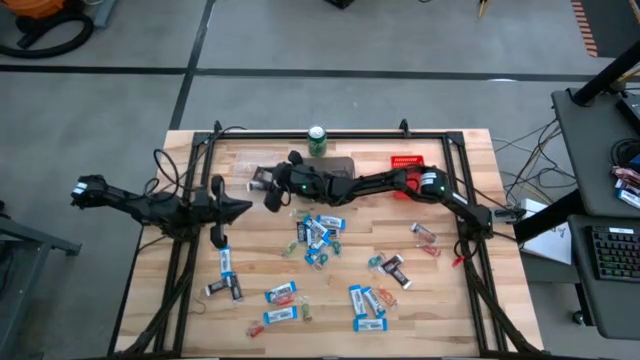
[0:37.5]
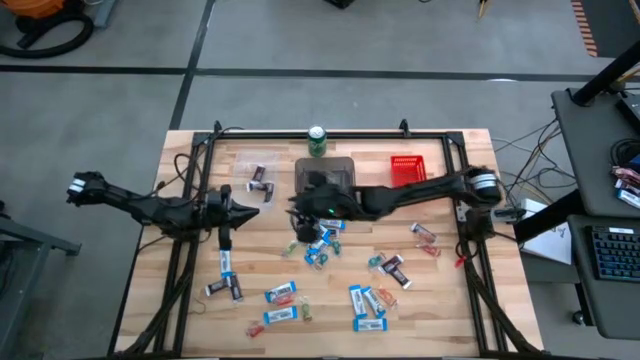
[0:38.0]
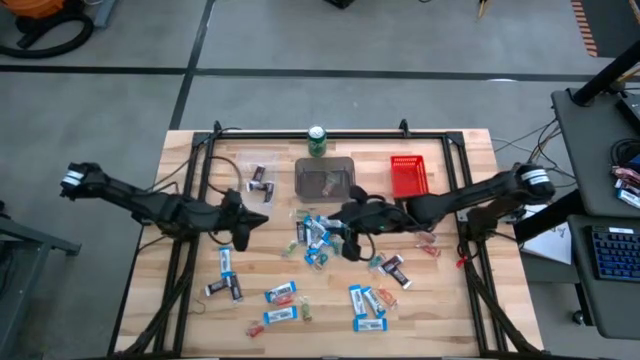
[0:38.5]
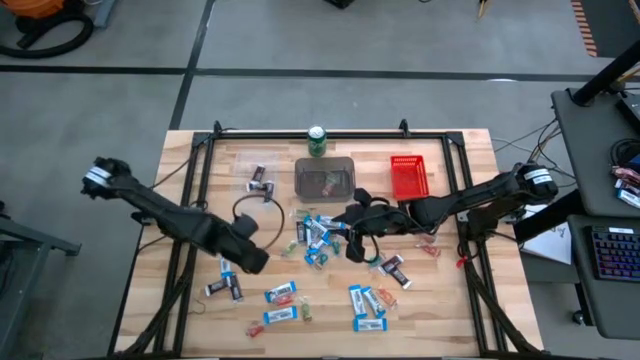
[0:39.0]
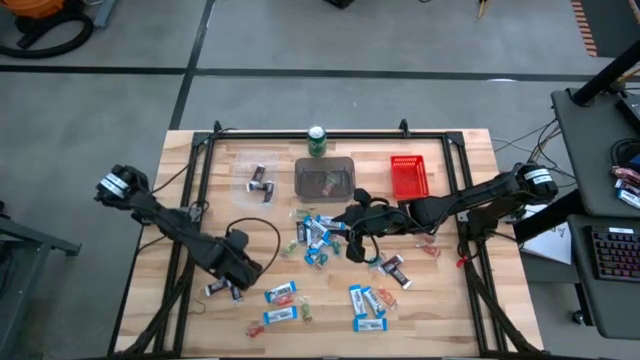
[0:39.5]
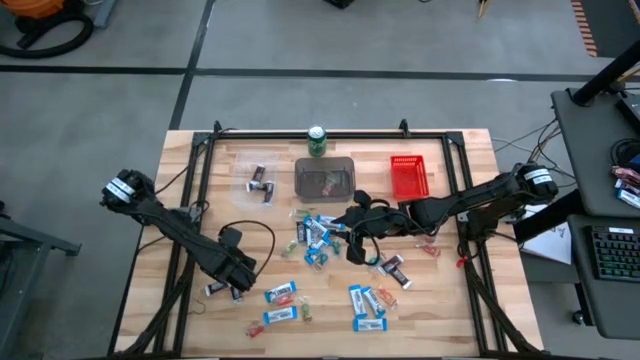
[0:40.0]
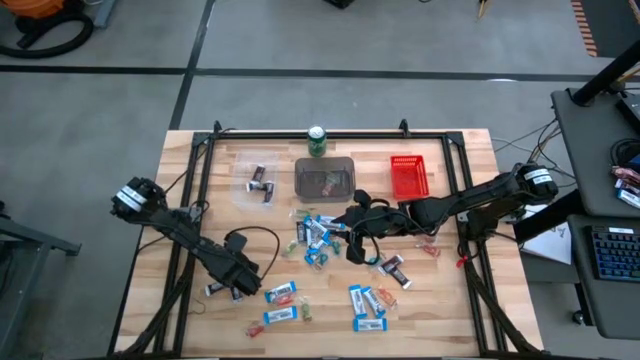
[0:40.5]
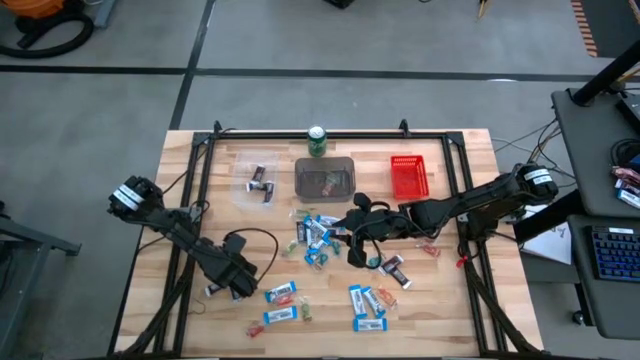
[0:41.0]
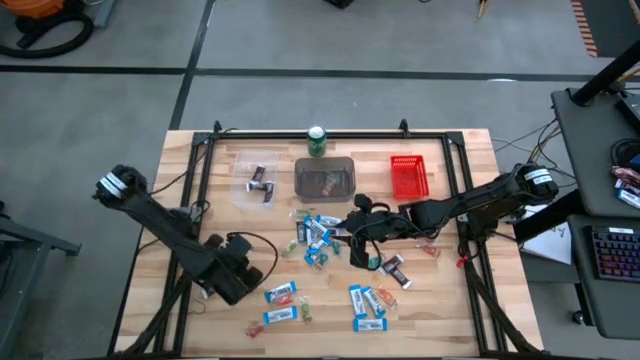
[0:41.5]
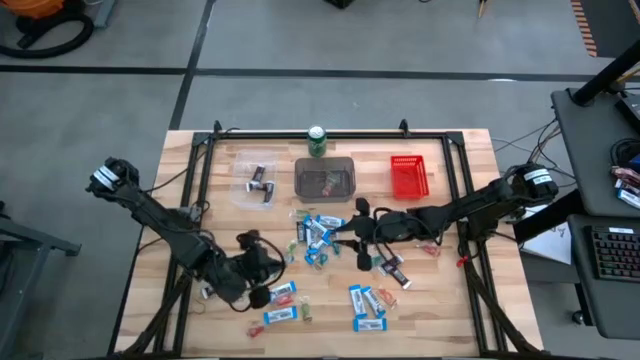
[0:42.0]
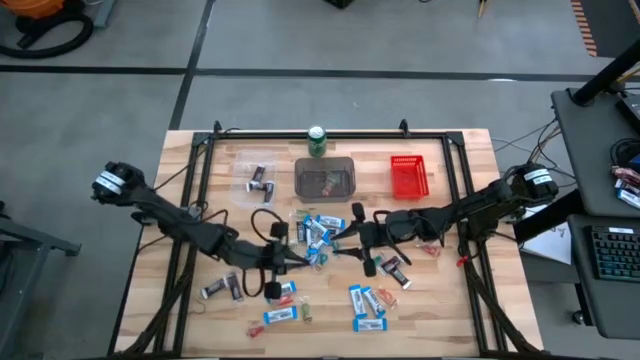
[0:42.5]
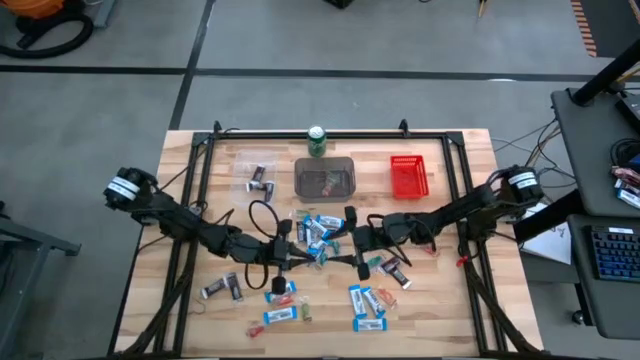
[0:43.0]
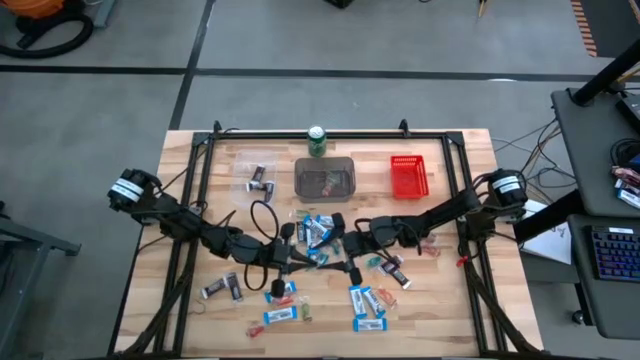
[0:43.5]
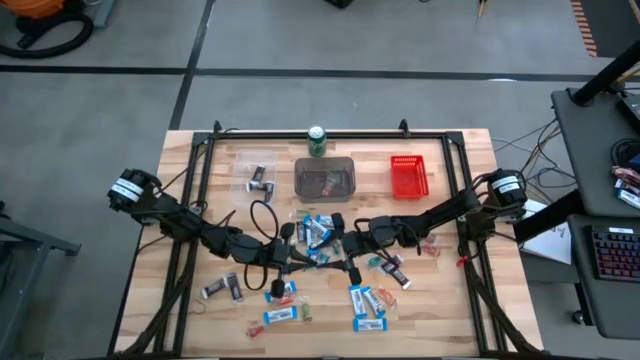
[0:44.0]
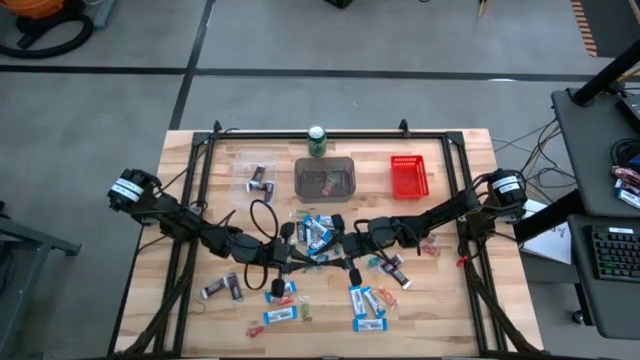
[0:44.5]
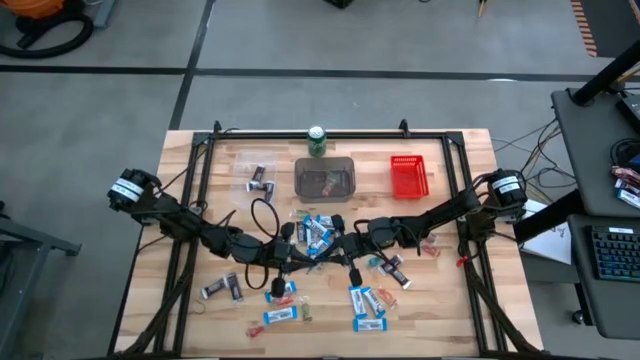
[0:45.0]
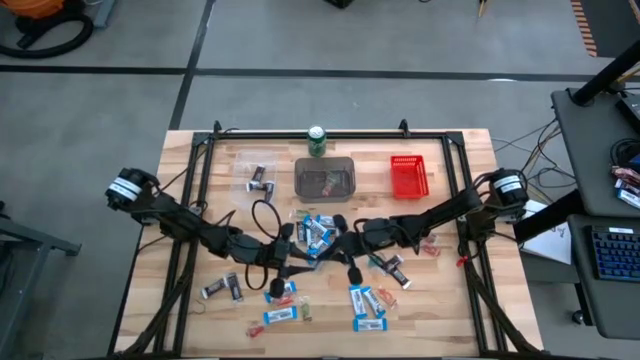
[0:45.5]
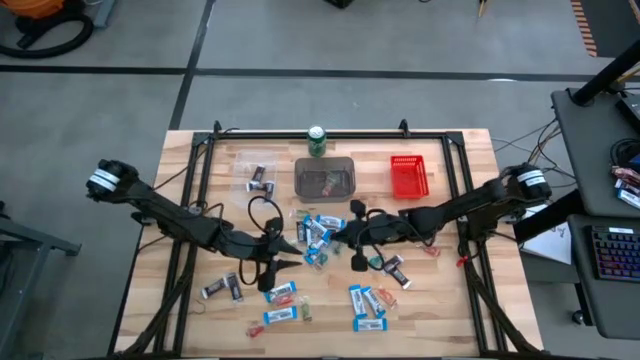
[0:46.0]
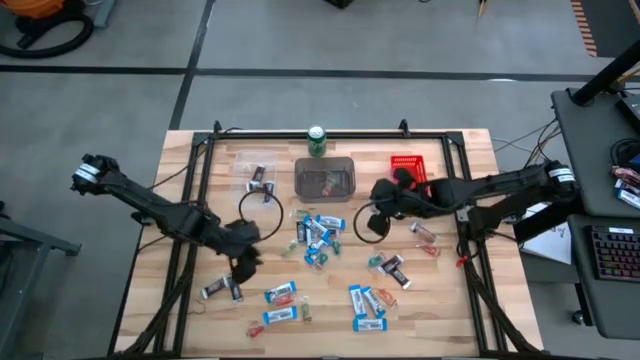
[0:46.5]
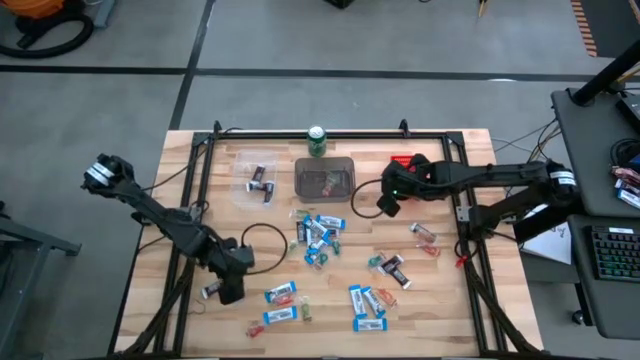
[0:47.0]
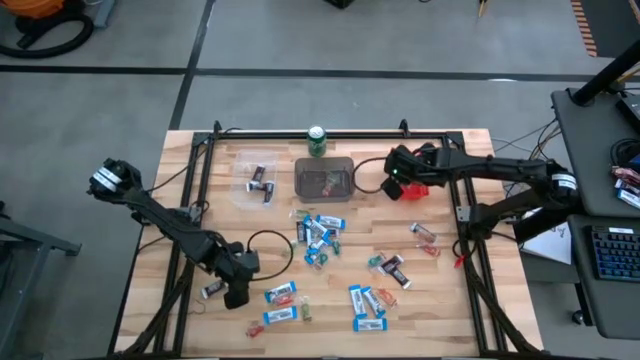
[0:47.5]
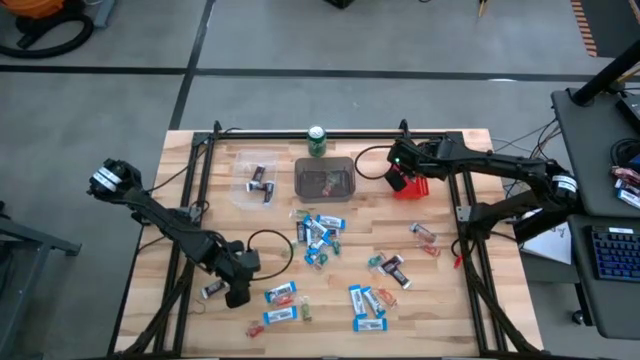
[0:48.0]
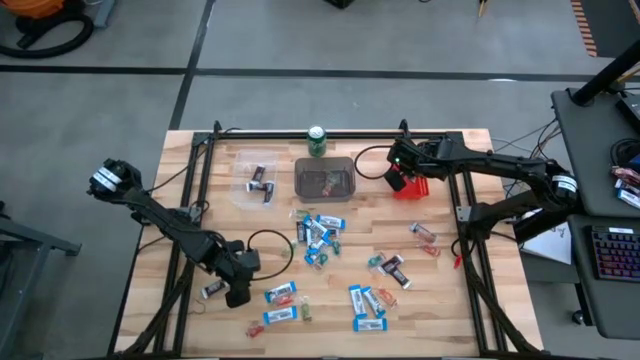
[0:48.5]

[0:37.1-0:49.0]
Task: Organize candy in baskets
Put the white chocolate bar into the red bin

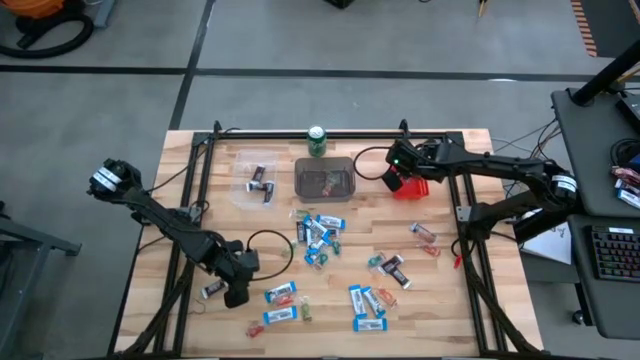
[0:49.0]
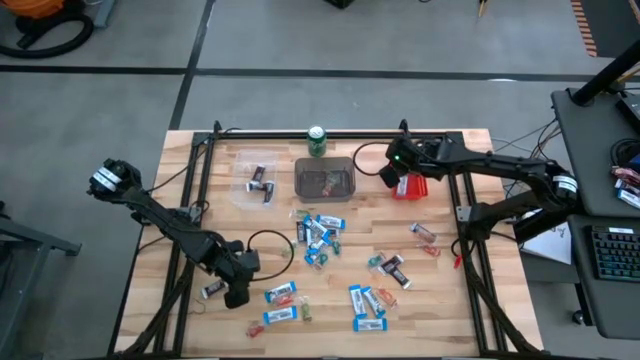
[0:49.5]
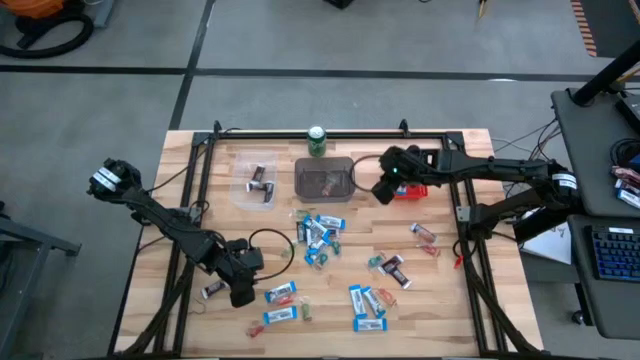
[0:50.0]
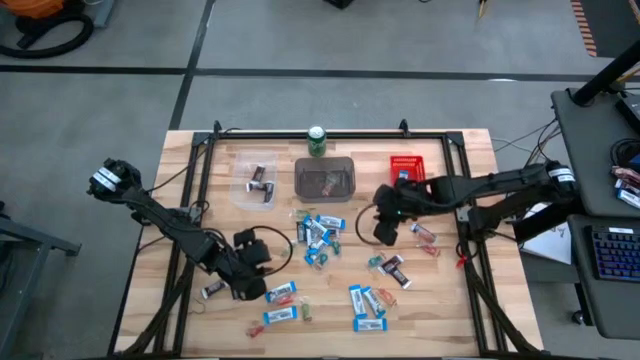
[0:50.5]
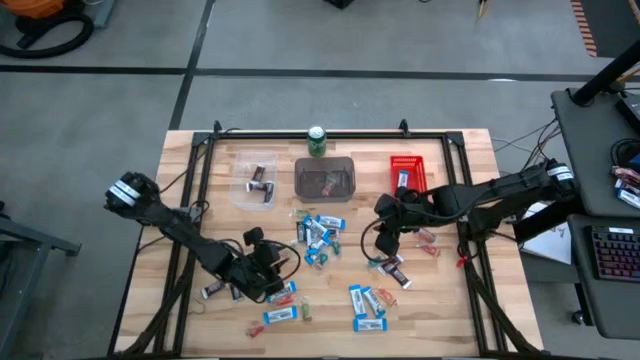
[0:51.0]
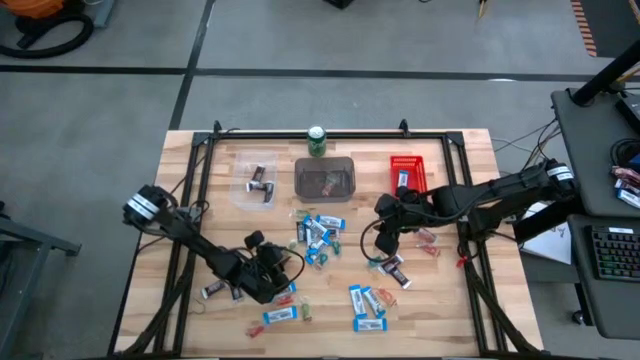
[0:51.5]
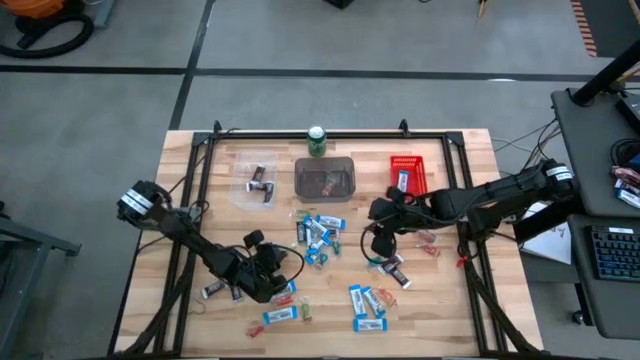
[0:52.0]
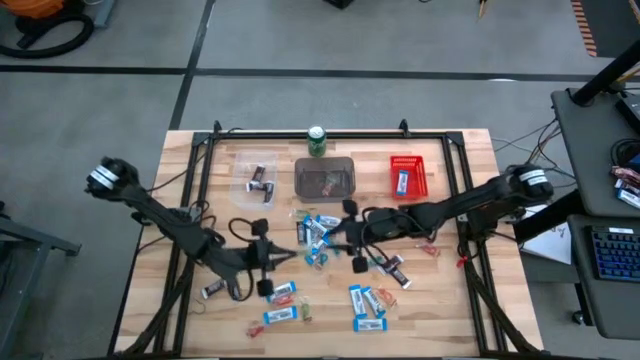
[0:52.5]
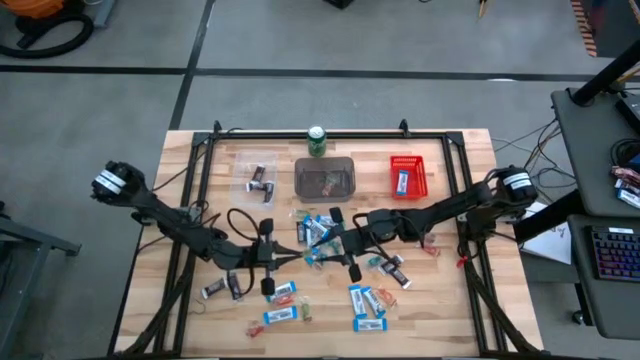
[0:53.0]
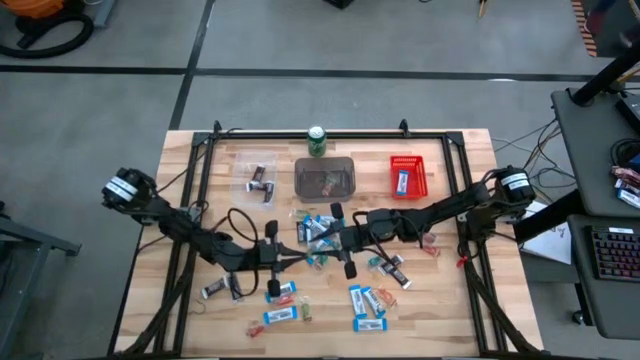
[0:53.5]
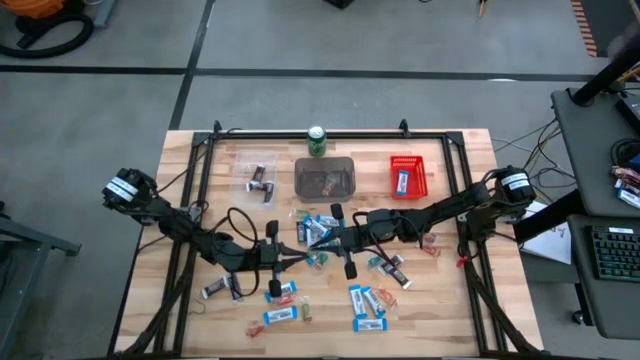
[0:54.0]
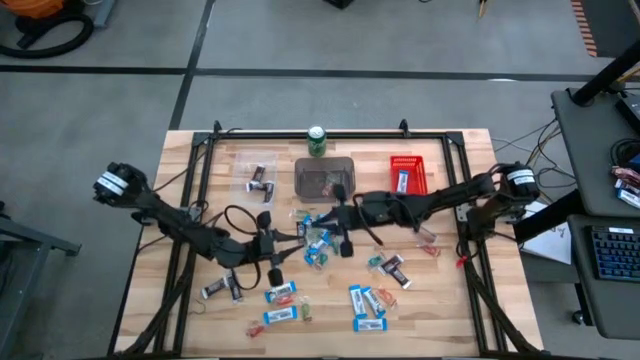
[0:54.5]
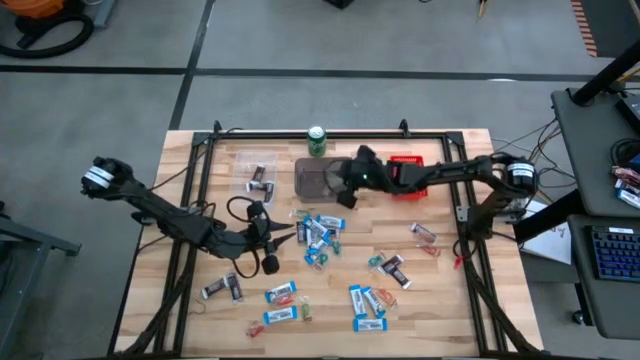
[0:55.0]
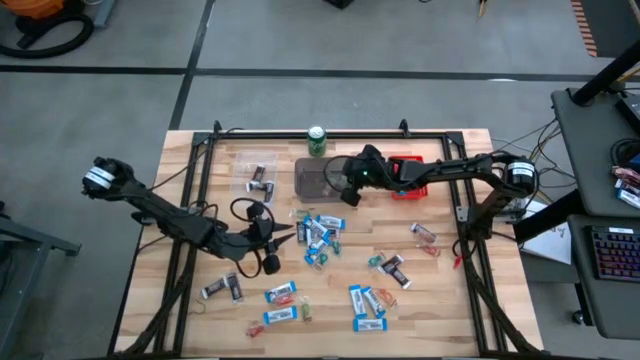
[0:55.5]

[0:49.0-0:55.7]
Put the green gummy into the black bin

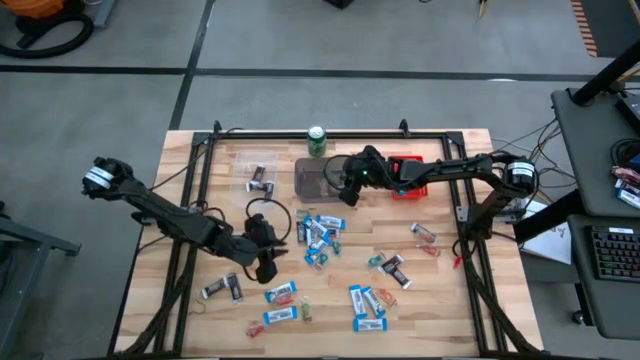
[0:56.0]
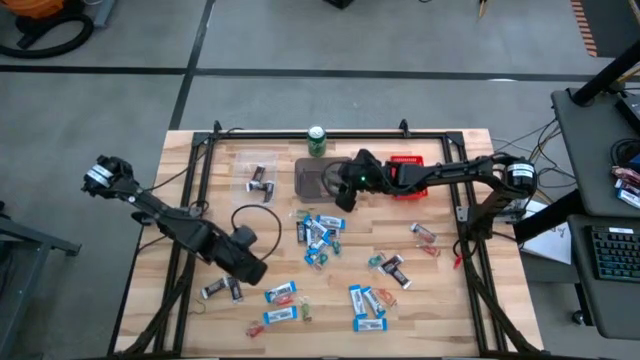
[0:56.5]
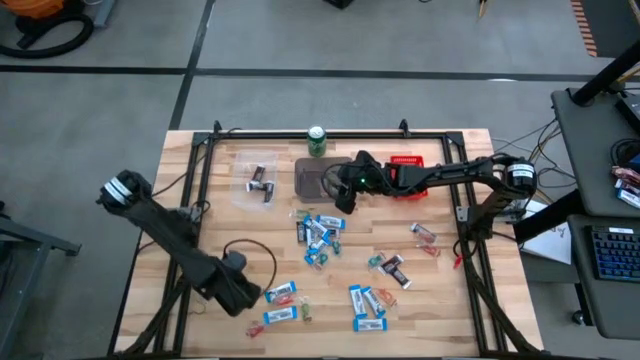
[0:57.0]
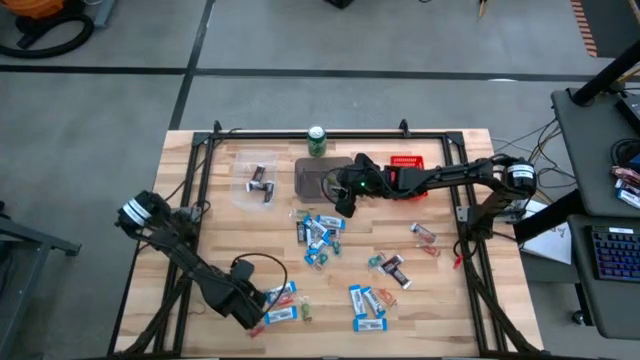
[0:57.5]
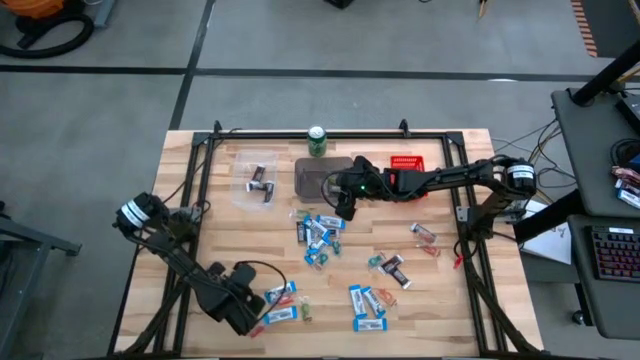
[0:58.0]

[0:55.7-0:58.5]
Put the brown chocolate bar into the transparent bin

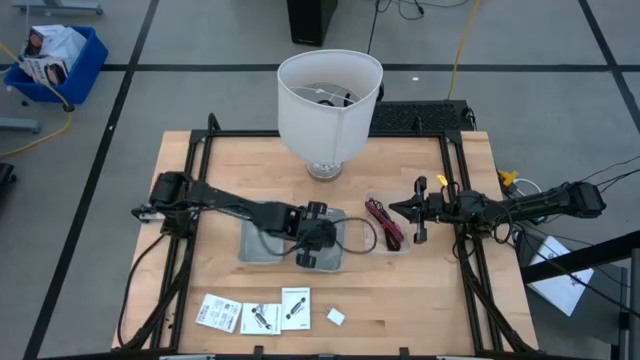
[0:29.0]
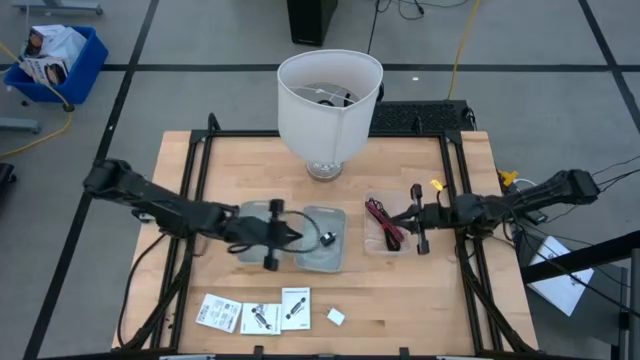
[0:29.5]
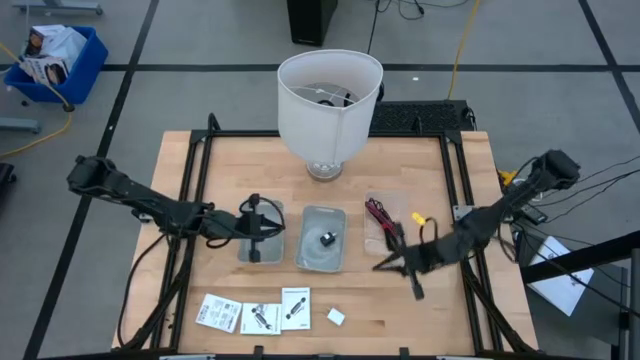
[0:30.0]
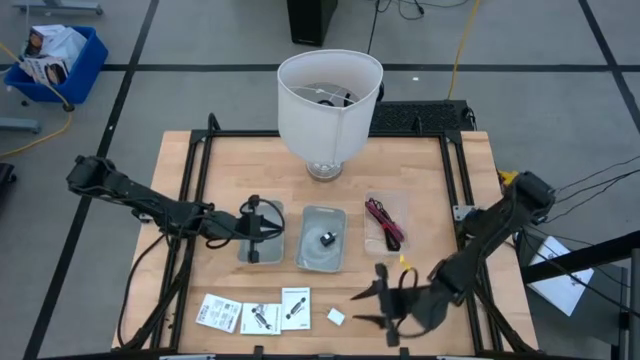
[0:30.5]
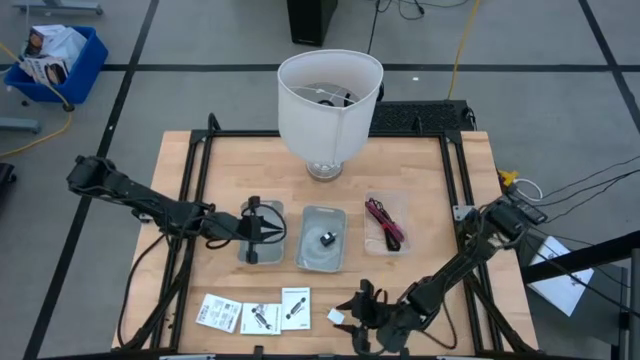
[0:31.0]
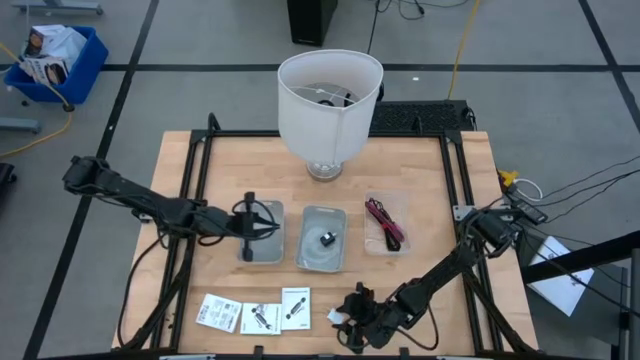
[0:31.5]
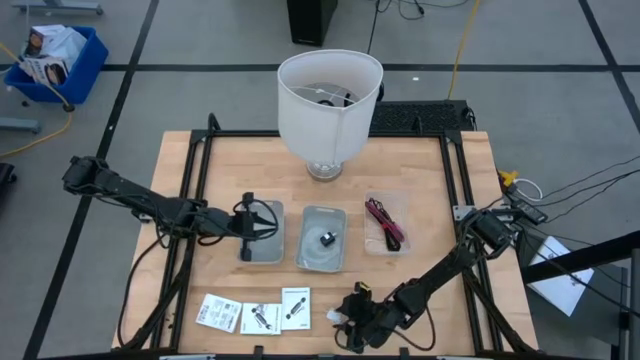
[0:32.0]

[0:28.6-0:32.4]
Task: Pick and place items into bin
Put the white charger adapter into the right gray bin
